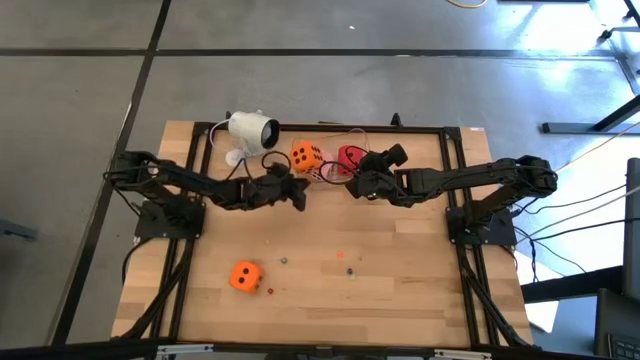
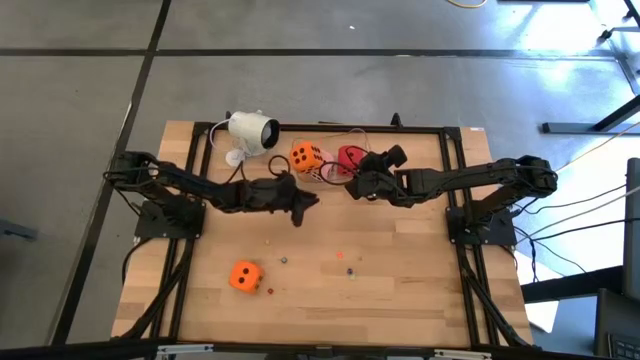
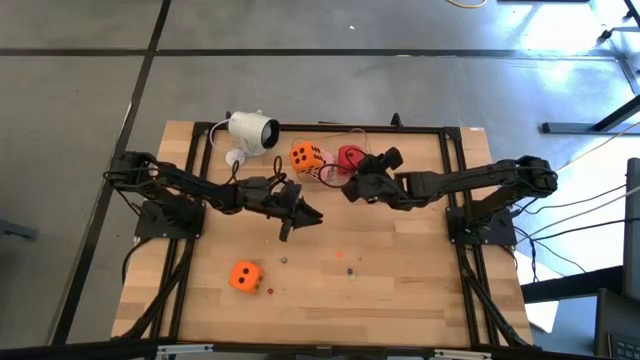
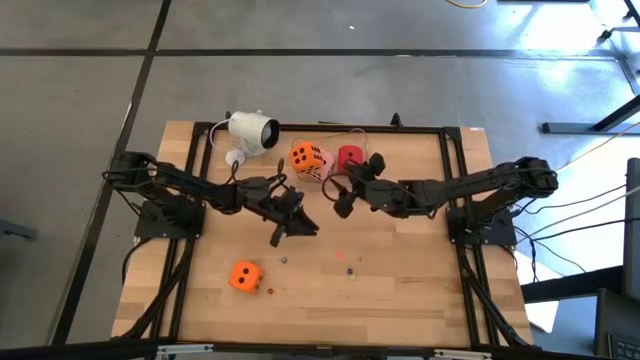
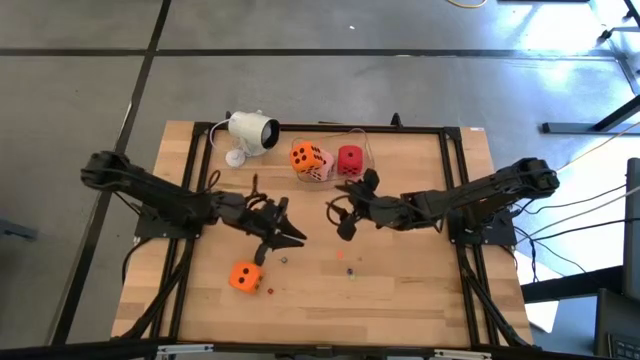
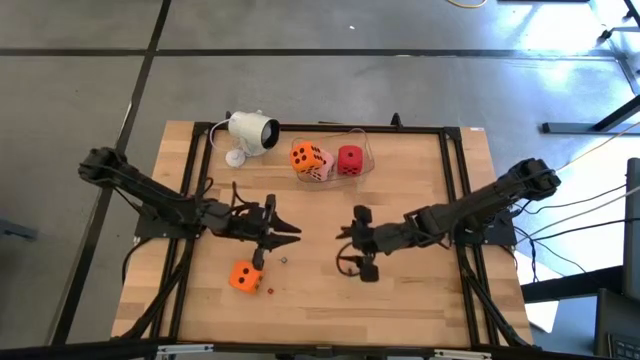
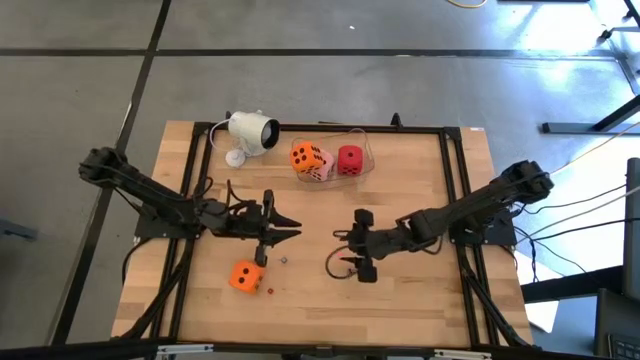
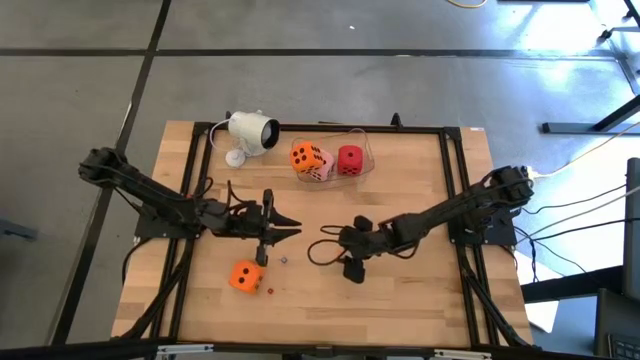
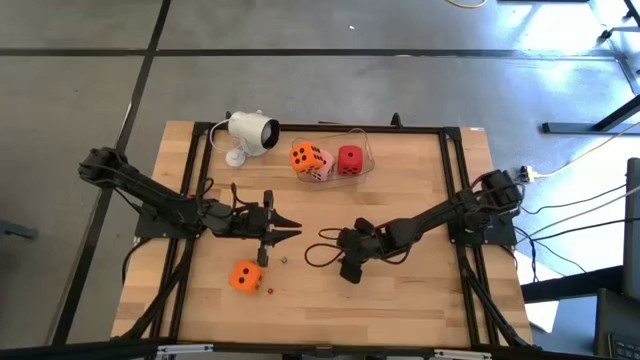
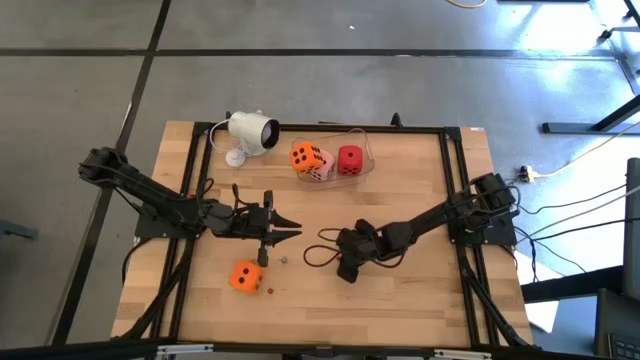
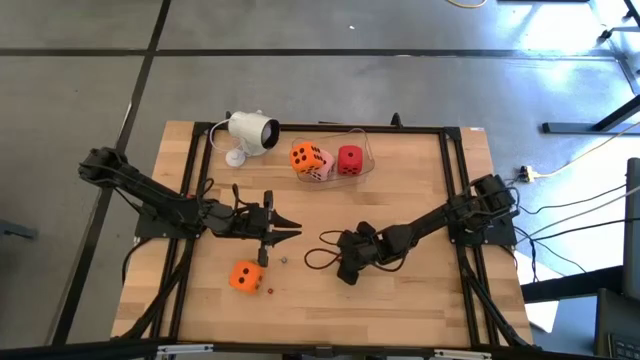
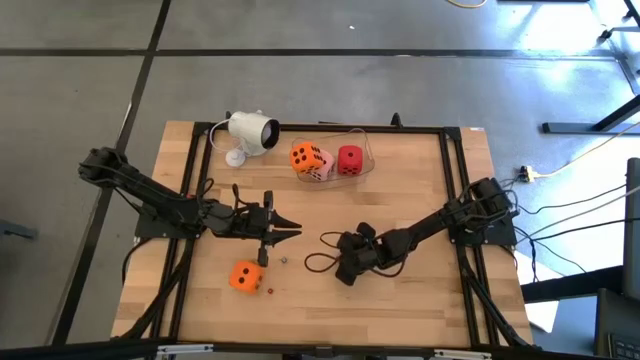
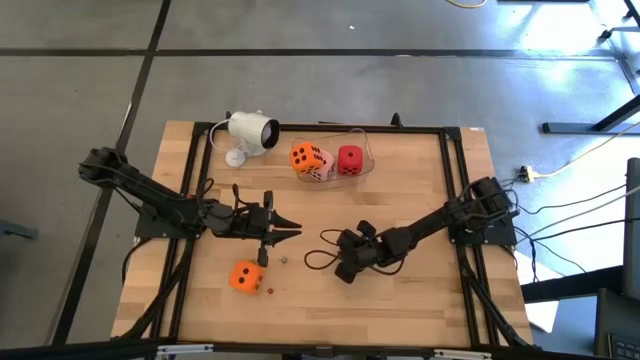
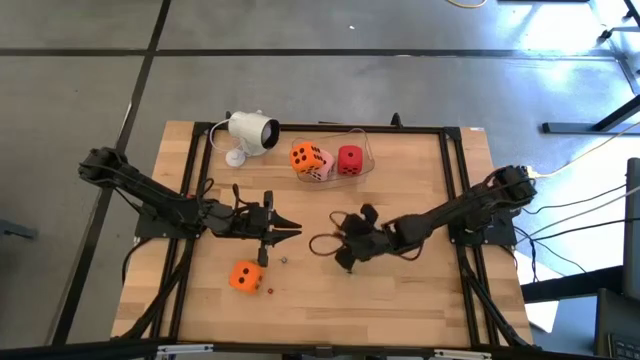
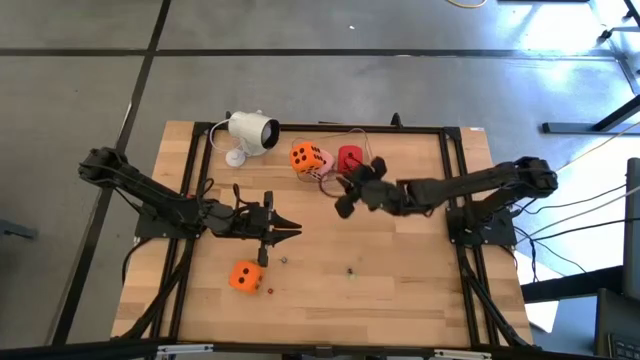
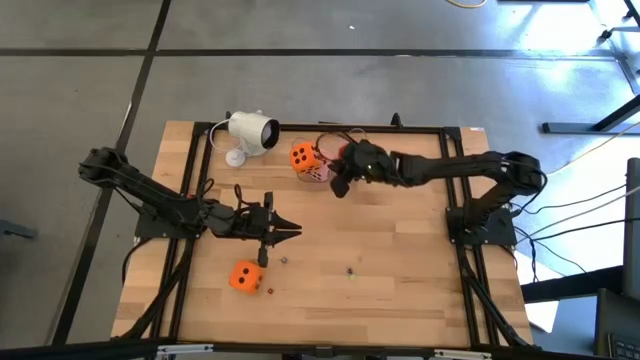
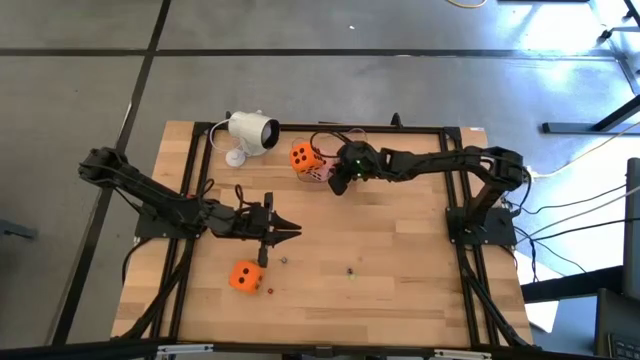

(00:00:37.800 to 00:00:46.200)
Task: Pick & Place Dice
Put the small orange die into the transparent bin

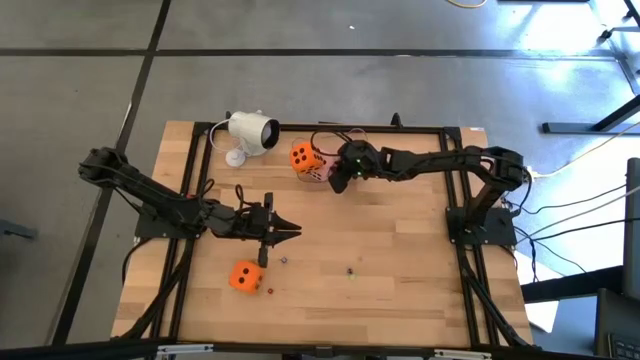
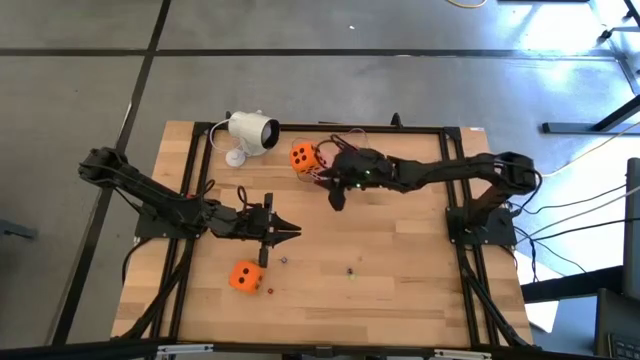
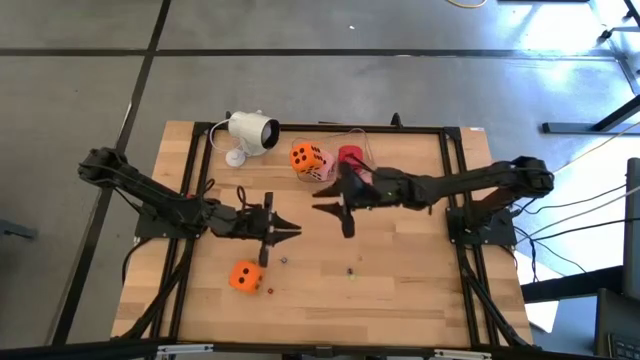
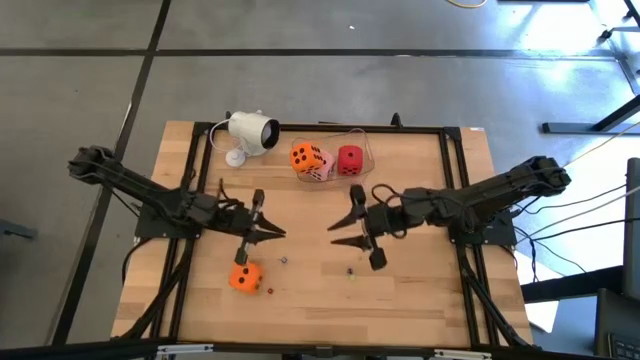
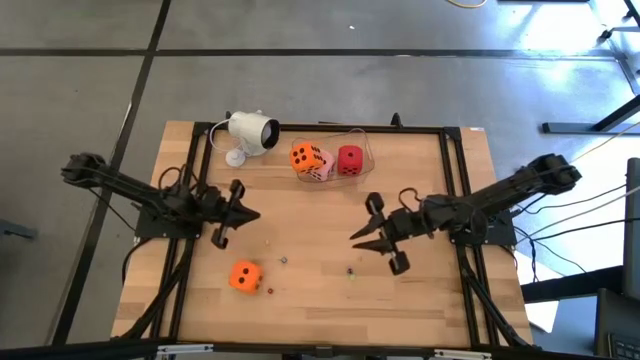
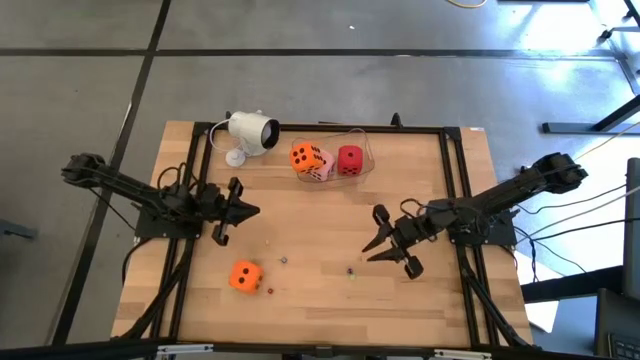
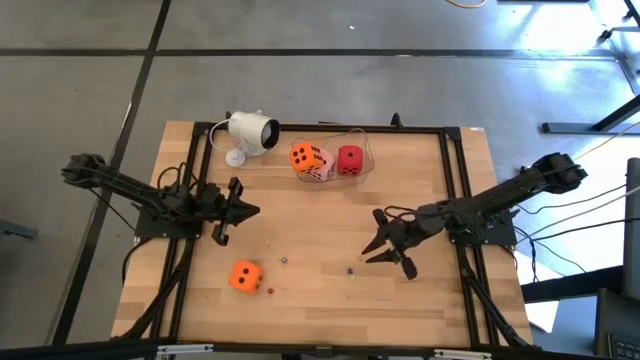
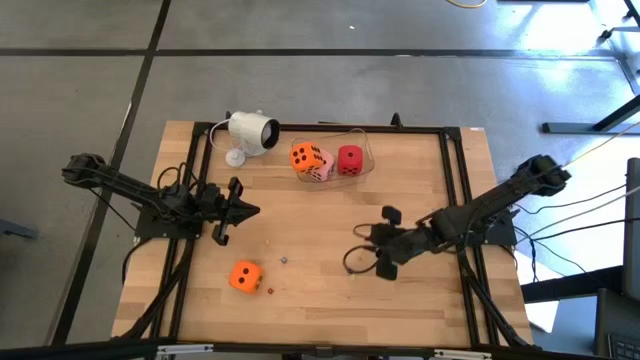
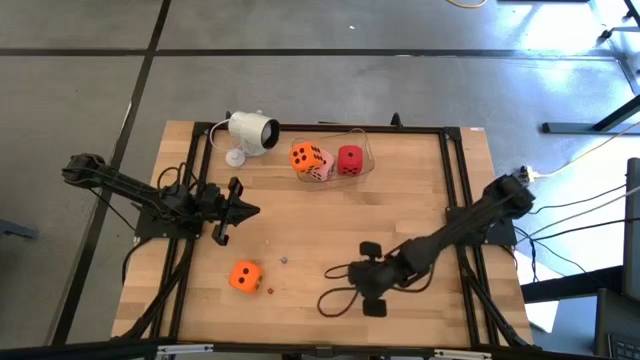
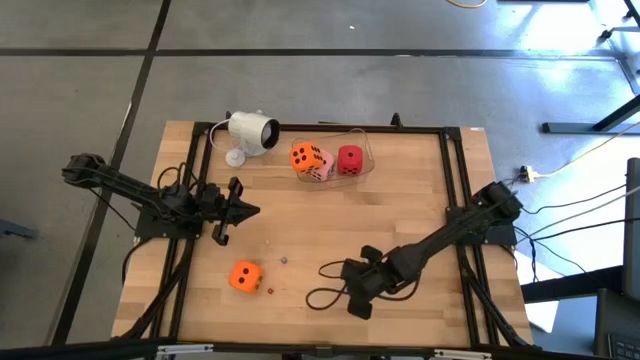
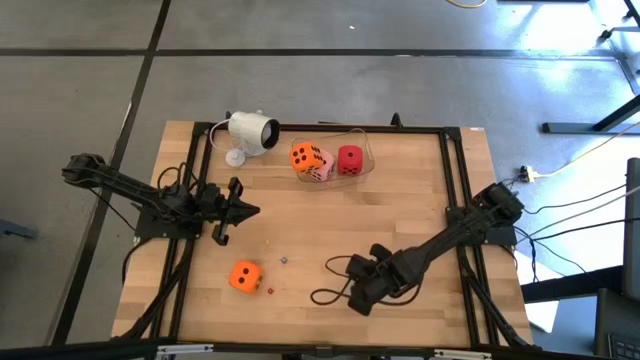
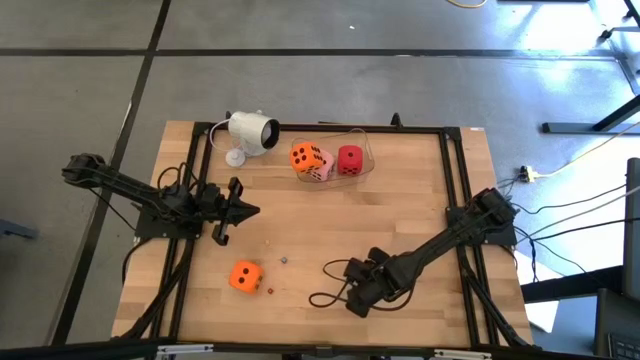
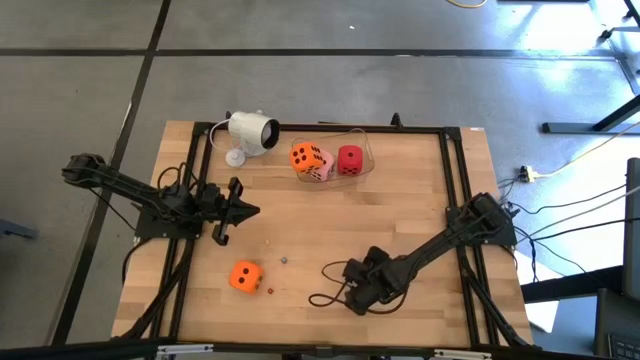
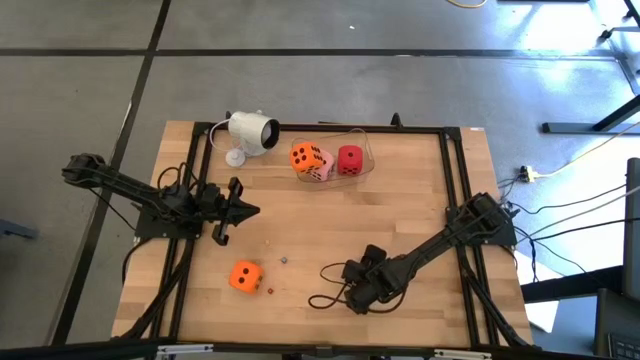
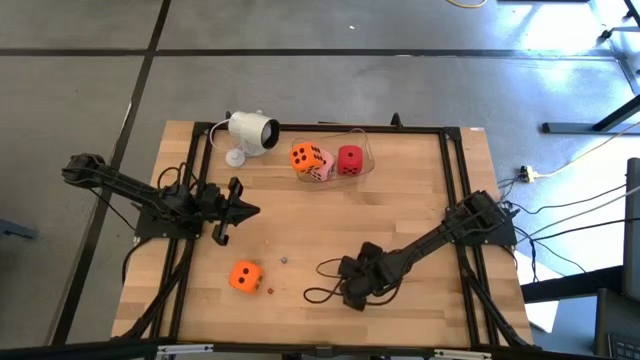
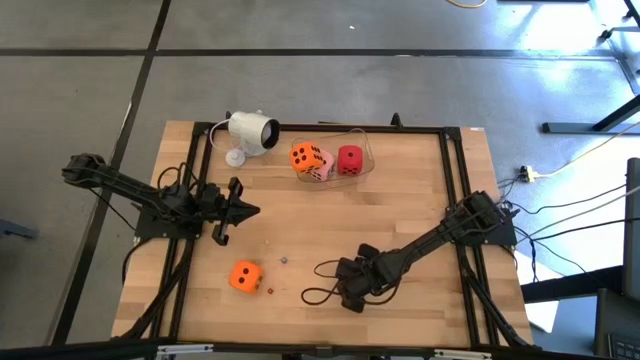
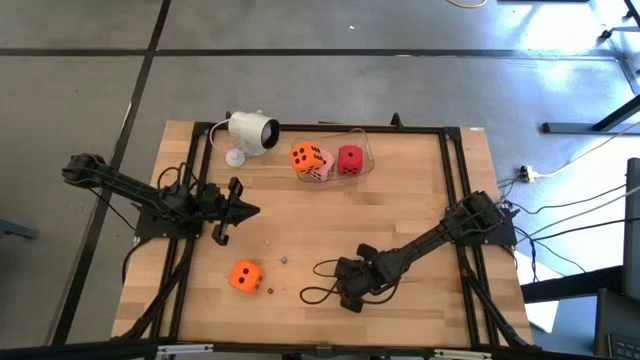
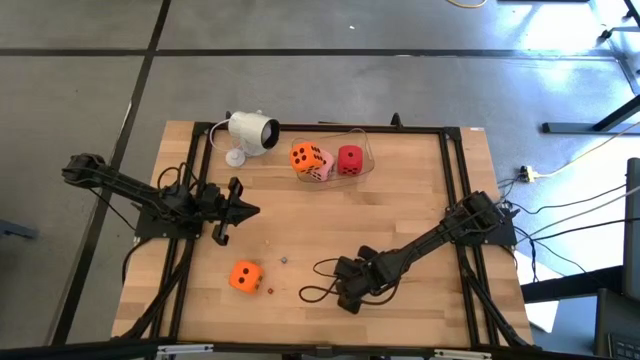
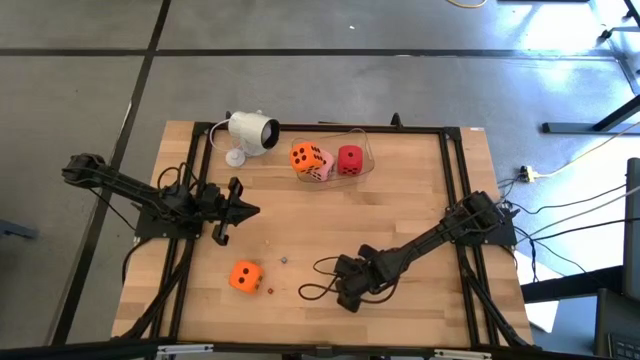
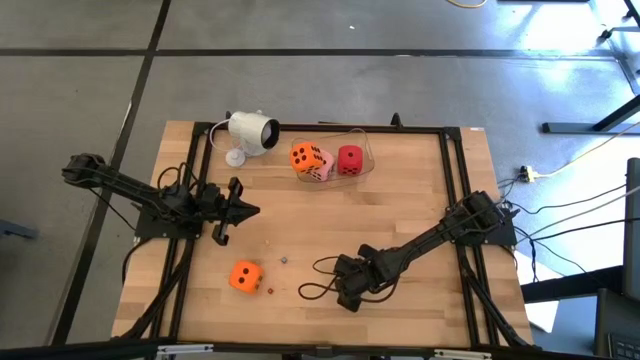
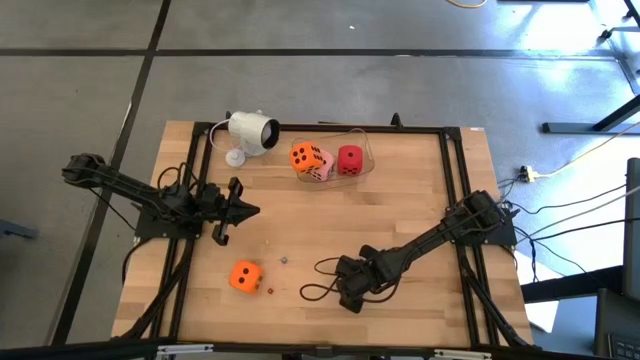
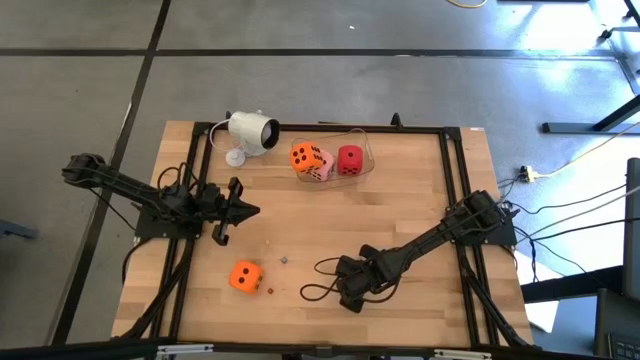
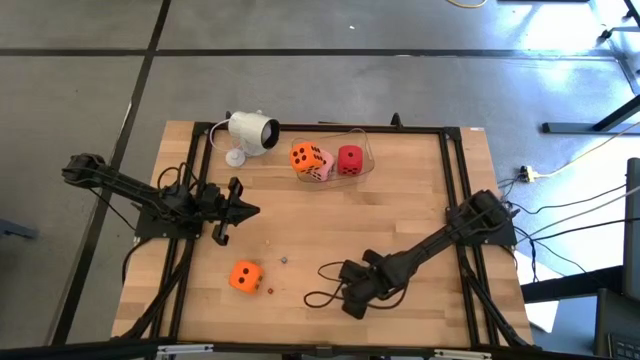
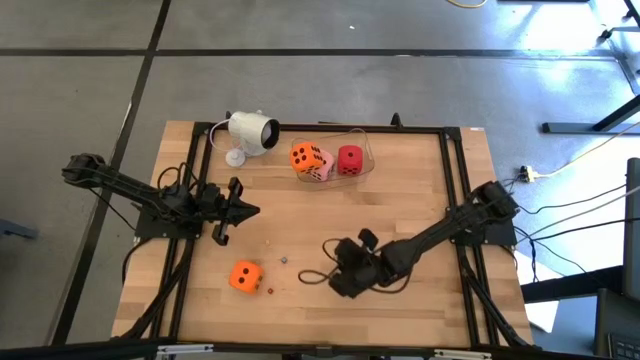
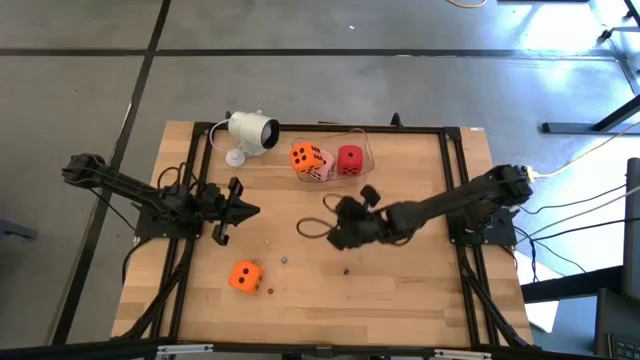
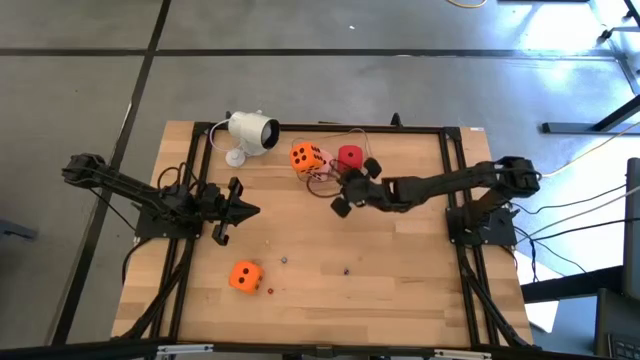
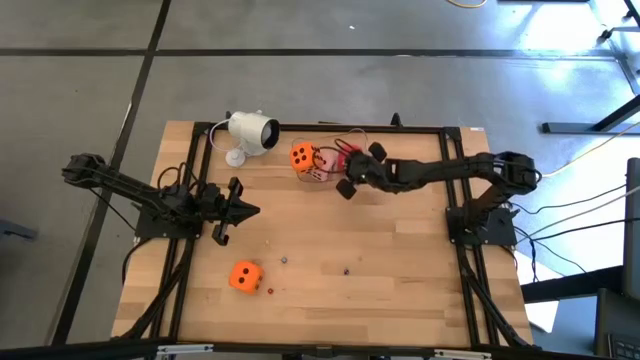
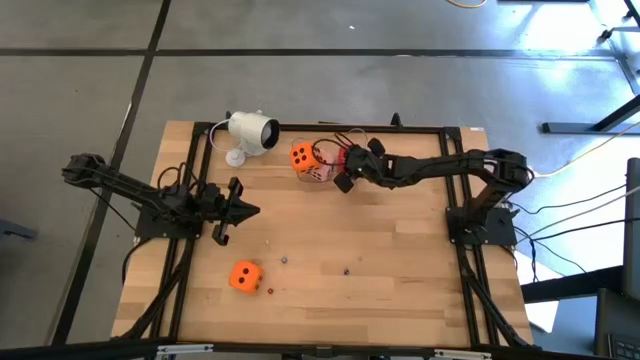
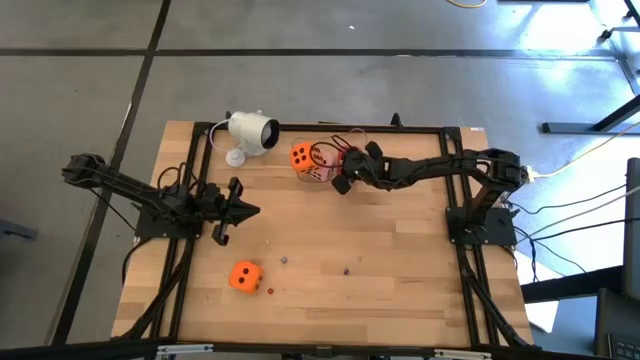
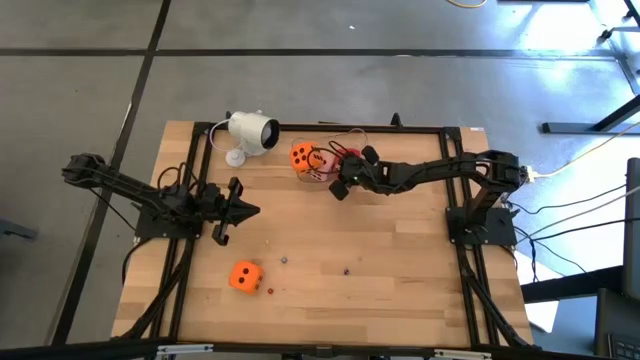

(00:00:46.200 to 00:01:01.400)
Put the small green die into the transparent bin
